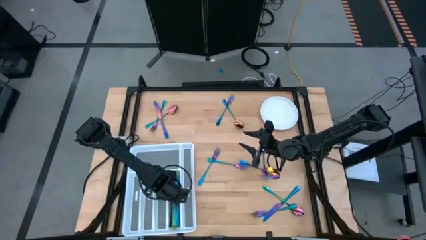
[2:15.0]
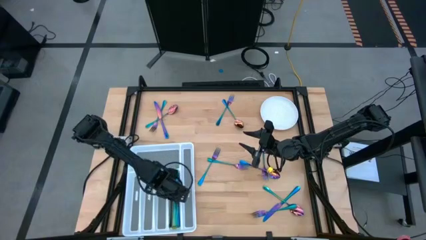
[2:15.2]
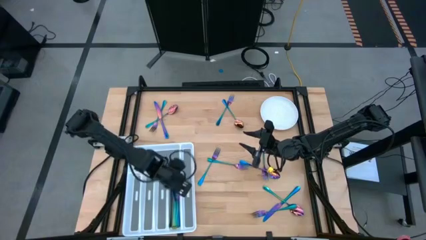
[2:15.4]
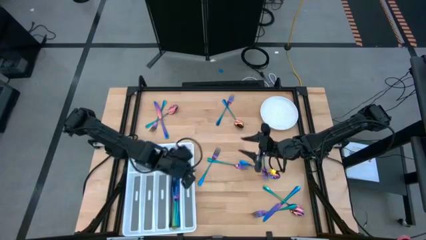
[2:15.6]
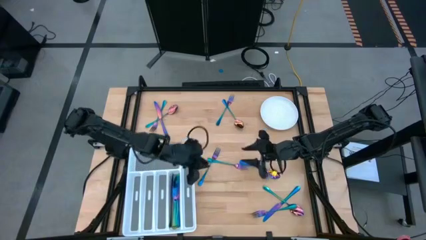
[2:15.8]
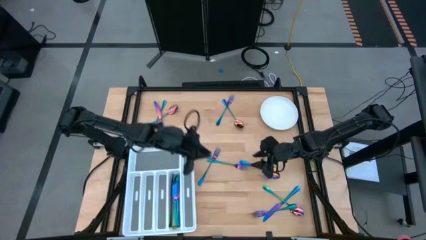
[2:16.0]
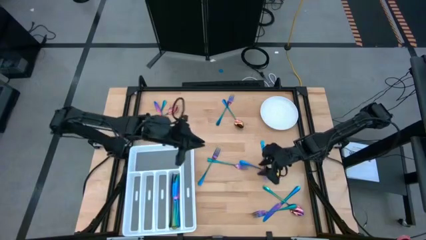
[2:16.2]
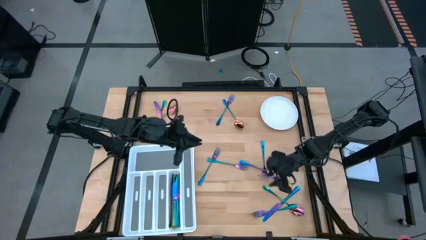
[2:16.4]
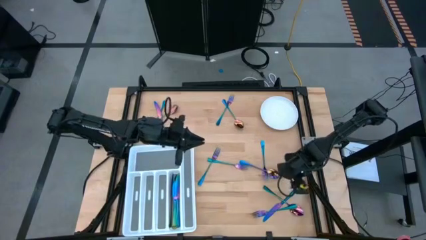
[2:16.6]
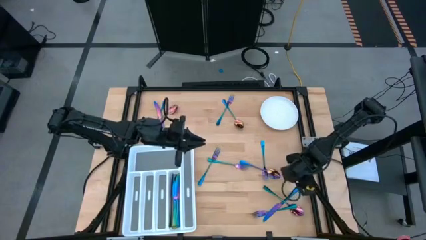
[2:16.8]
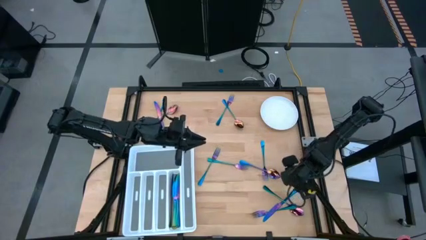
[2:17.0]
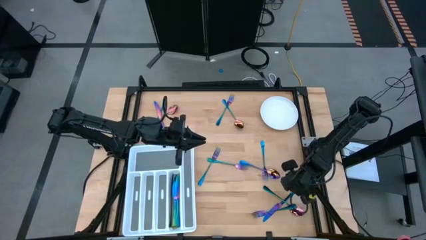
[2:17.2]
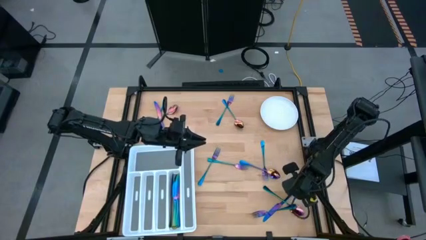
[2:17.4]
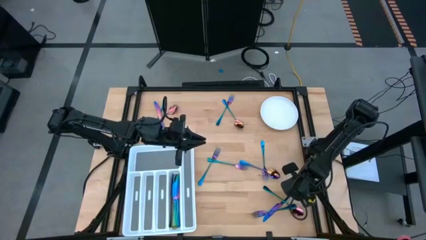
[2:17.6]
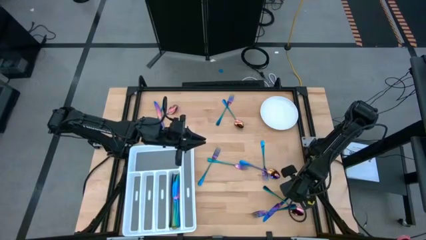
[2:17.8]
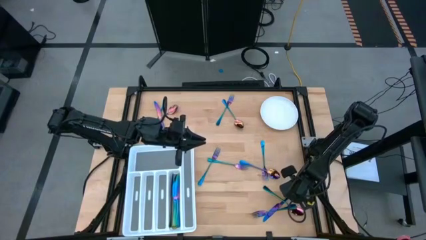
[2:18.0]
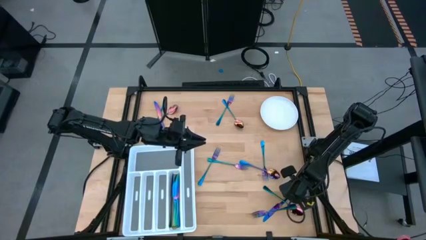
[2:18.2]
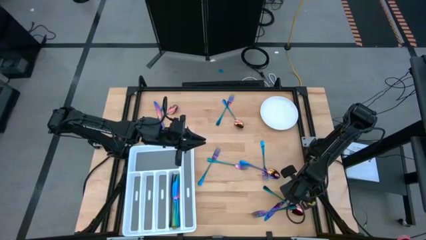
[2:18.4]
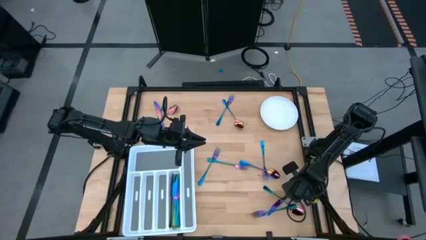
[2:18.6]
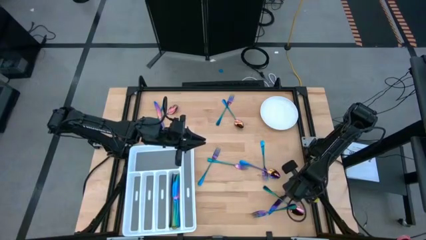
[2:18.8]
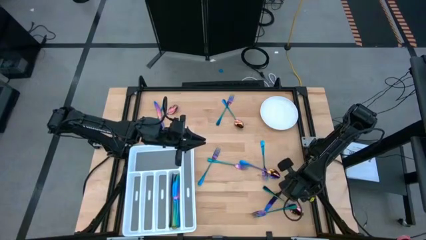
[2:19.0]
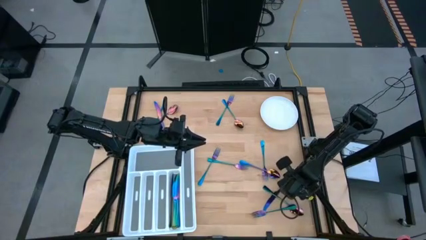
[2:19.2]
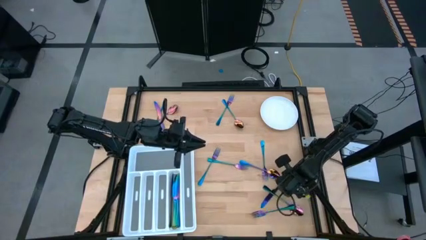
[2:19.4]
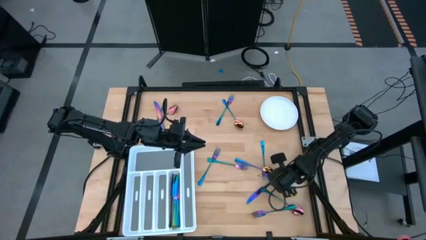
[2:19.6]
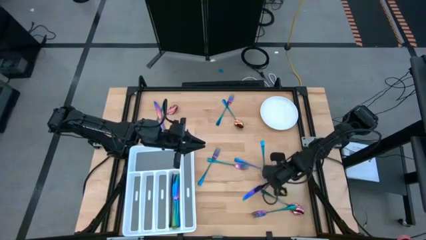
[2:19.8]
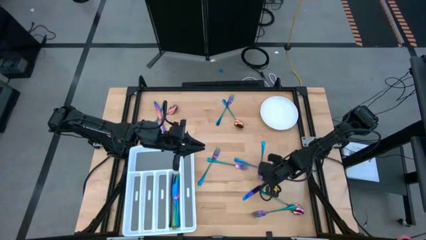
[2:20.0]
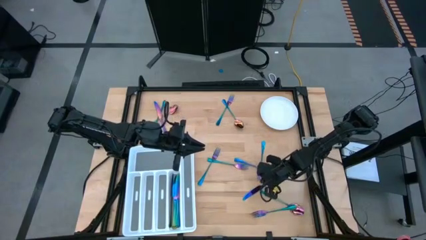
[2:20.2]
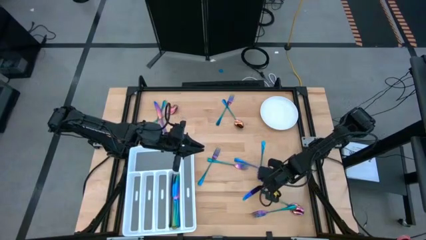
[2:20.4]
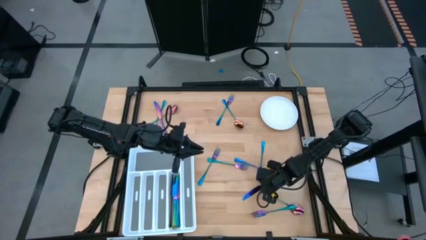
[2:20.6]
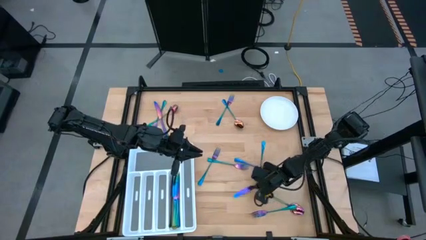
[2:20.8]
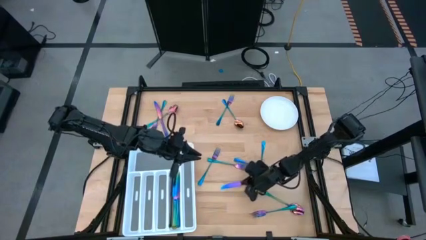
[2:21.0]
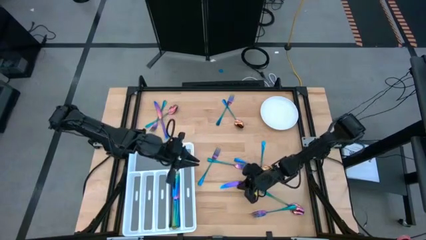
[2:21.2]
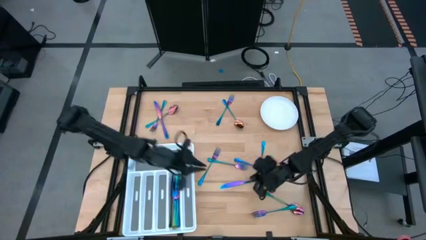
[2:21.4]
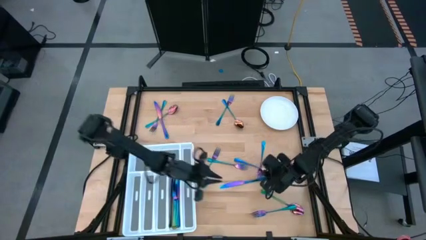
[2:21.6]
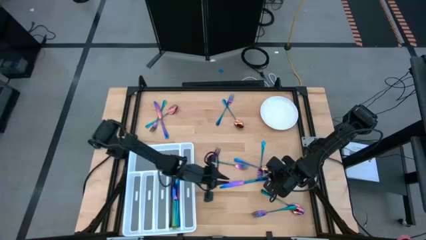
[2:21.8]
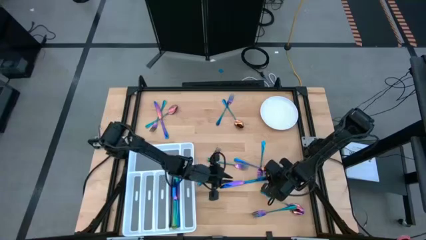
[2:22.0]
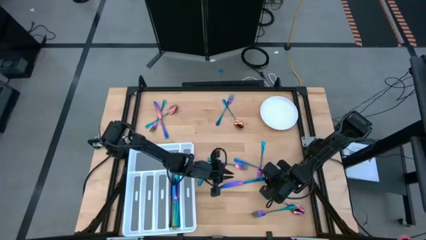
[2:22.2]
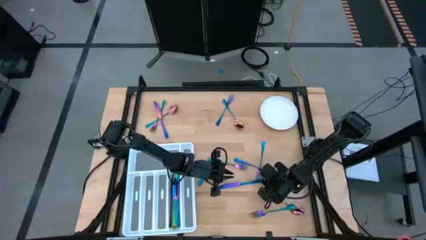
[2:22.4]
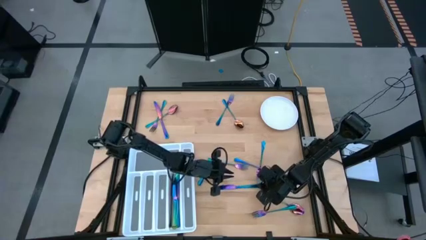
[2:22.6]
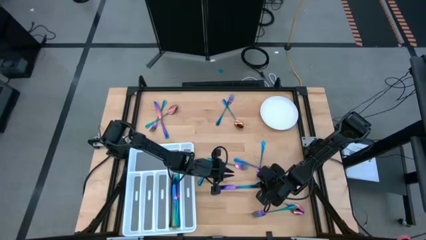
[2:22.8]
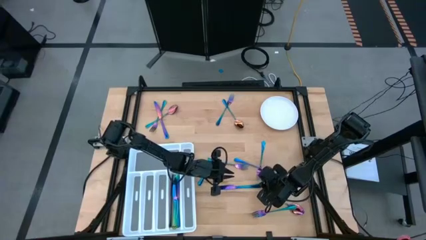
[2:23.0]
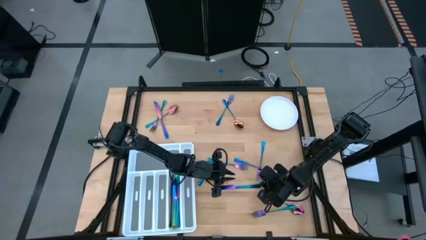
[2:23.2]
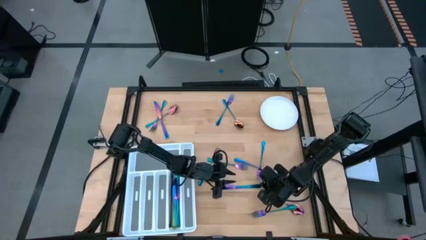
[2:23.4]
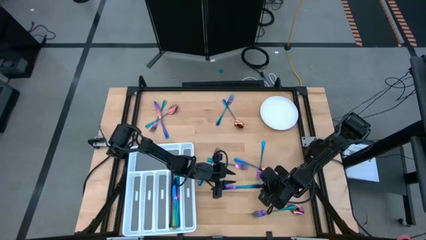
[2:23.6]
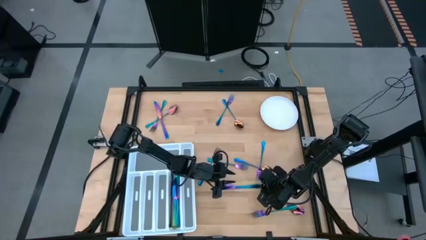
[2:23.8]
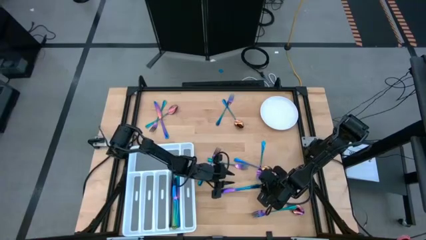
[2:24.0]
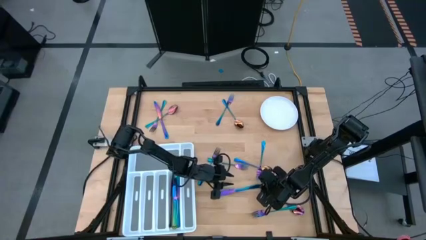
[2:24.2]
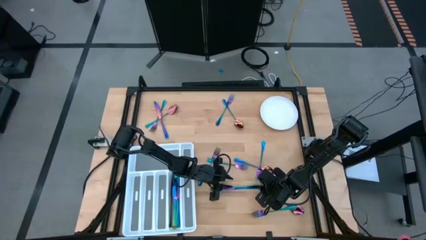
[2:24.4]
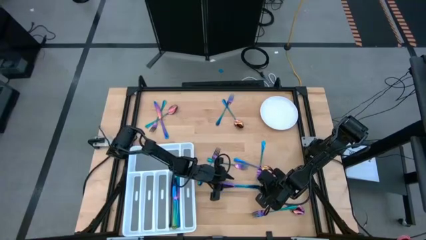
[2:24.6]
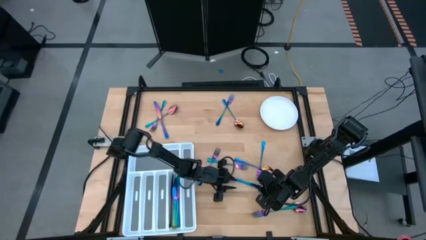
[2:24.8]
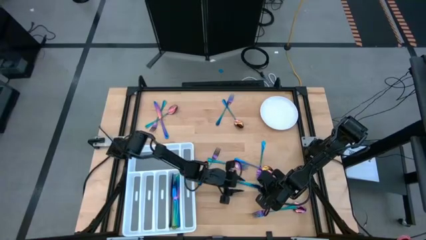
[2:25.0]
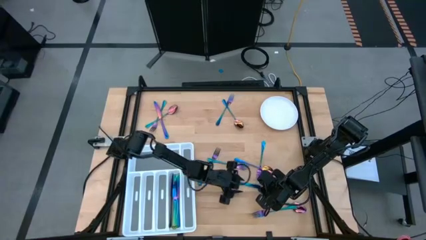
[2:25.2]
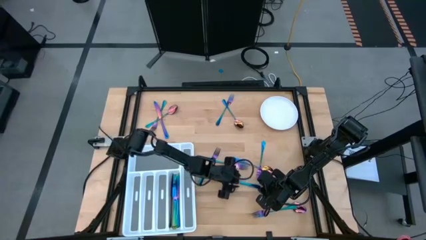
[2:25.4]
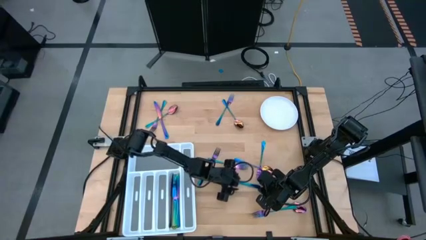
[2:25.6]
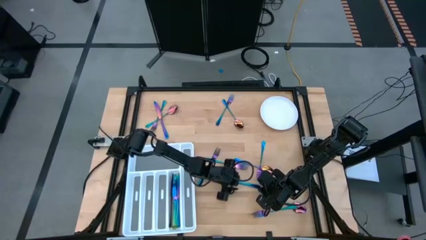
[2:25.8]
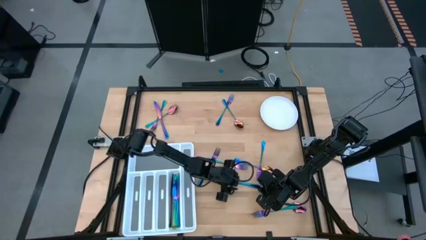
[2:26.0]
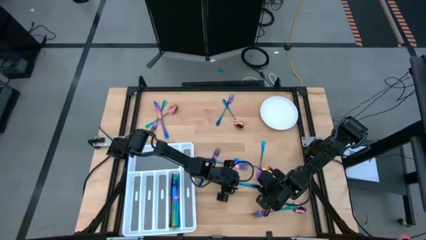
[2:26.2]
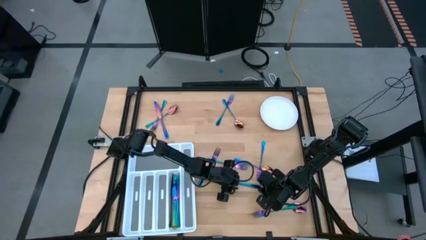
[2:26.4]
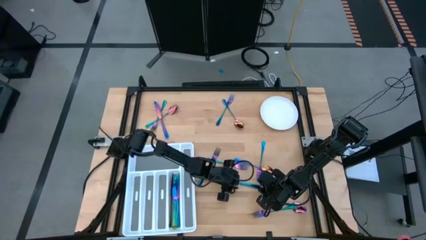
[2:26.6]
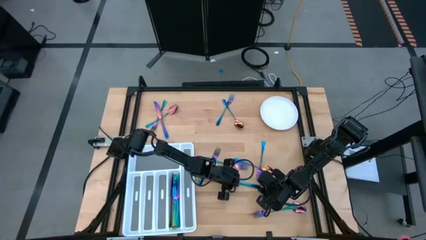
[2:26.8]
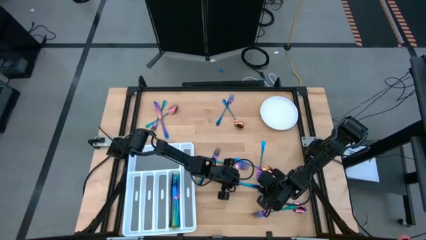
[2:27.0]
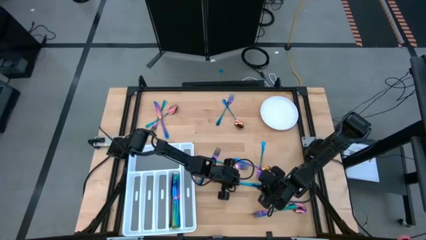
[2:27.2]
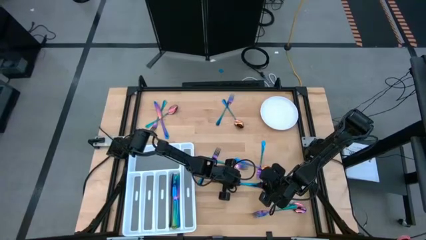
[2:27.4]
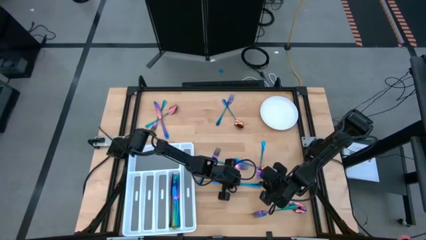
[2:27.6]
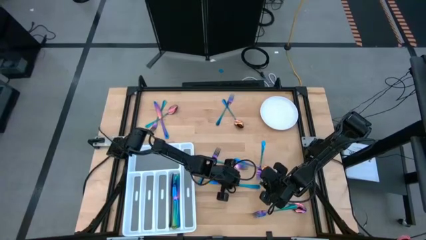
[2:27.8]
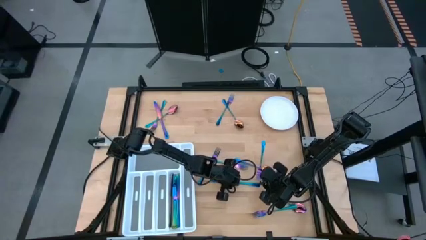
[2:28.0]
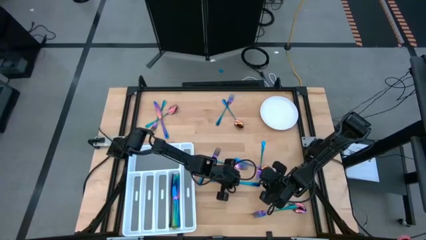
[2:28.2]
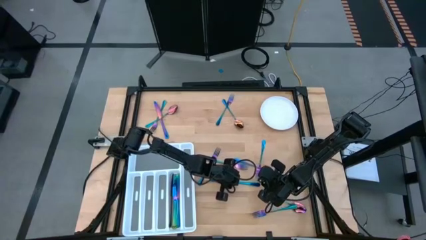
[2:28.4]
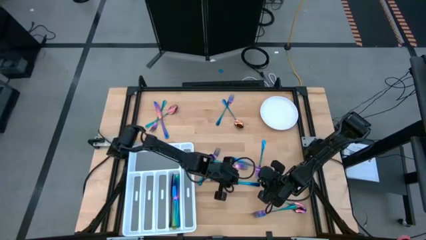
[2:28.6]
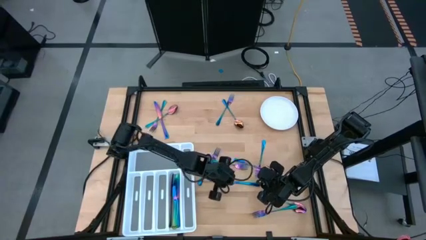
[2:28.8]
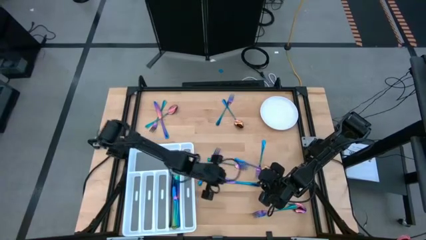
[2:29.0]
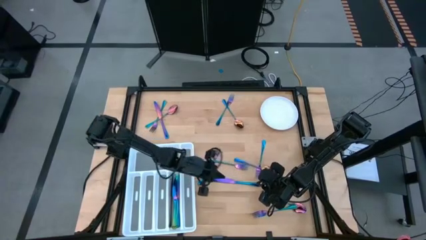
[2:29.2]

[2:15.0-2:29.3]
Task: Sort silverware
Put the bottom iridescent knife into the cutlery tray

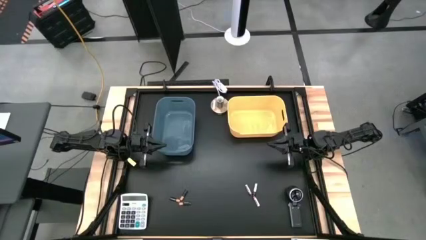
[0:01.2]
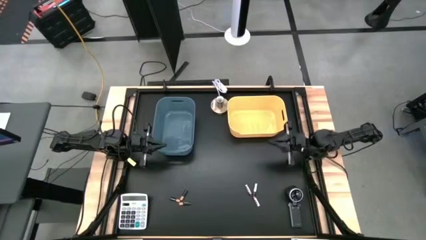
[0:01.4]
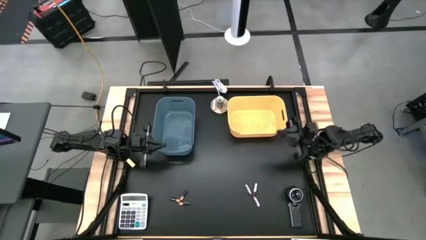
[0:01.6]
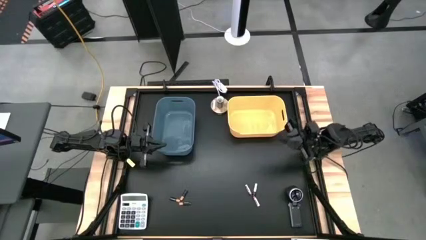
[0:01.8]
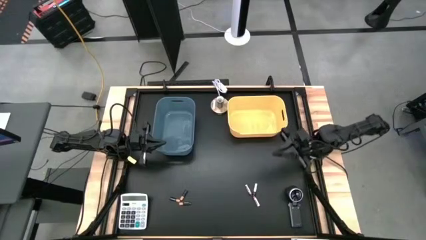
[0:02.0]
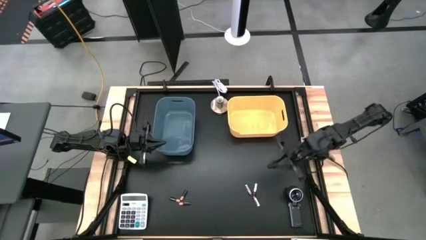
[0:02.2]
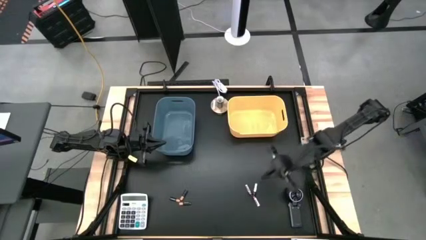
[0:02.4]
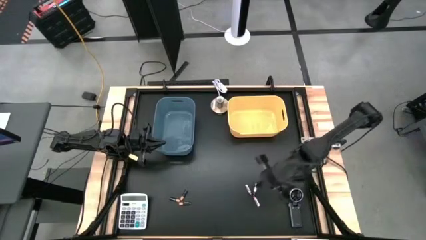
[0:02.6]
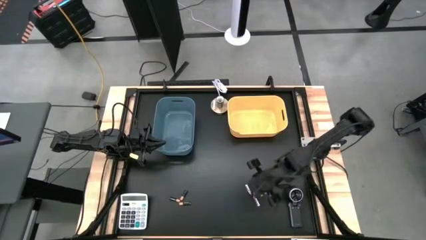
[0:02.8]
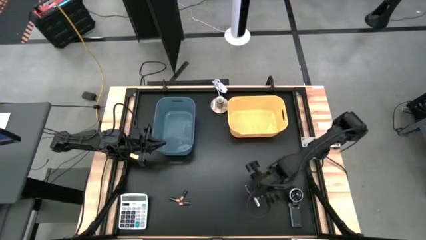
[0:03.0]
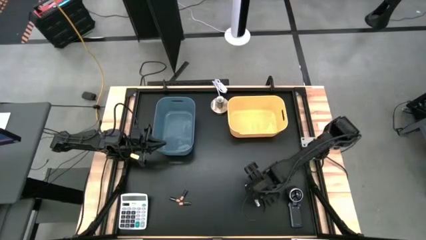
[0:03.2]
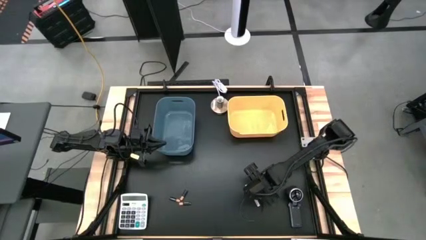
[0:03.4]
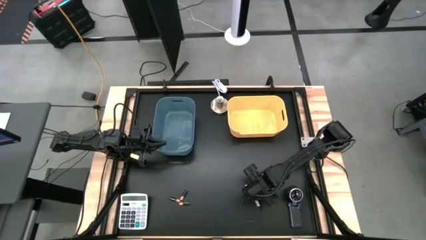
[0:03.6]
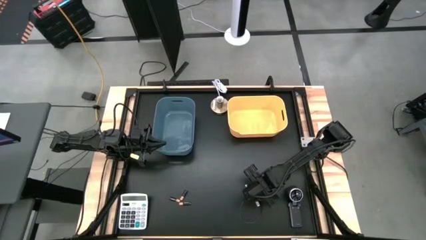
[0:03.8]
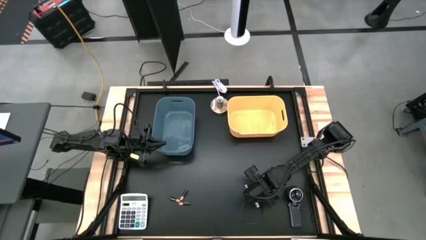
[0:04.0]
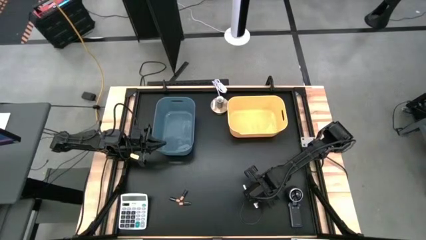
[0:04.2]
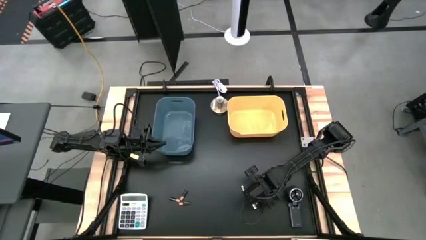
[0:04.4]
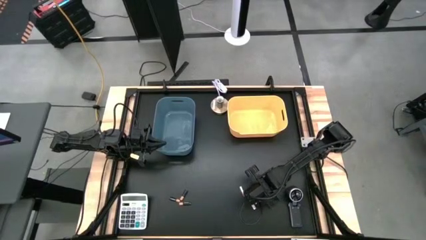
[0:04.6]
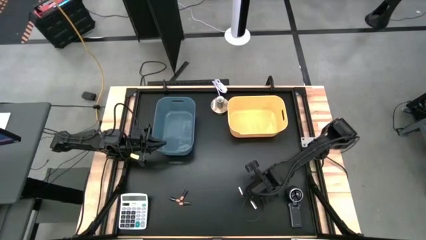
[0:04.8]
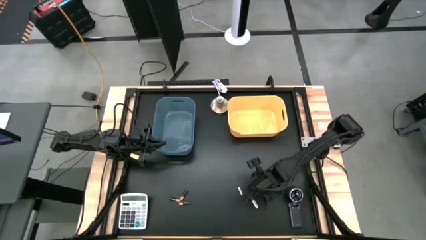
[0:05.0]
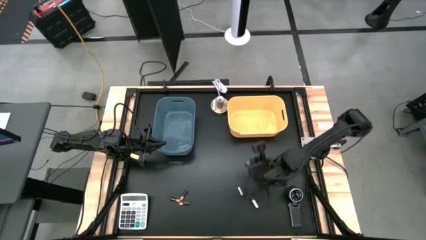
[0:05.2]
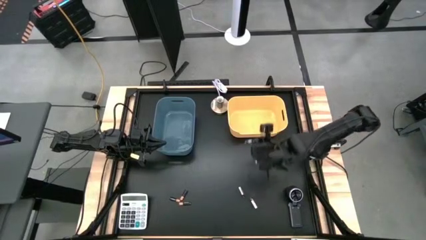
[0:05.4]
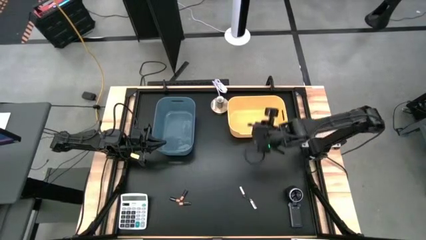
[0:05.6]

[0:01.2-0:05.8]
Task: Sort batteries
Put the top right silver battery into the yellow bin
